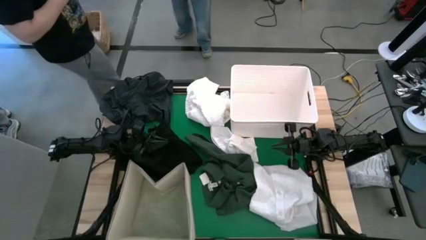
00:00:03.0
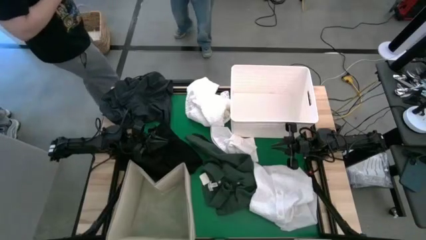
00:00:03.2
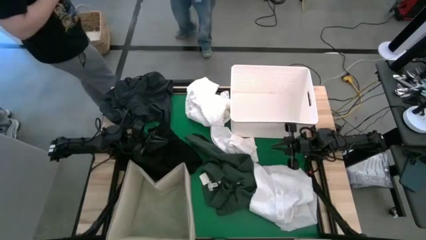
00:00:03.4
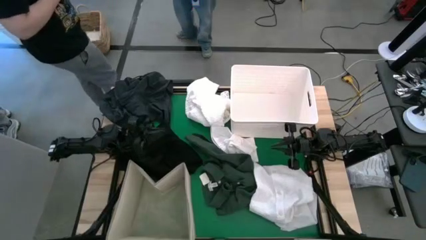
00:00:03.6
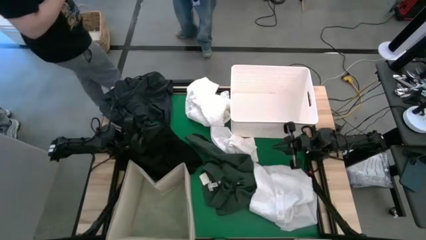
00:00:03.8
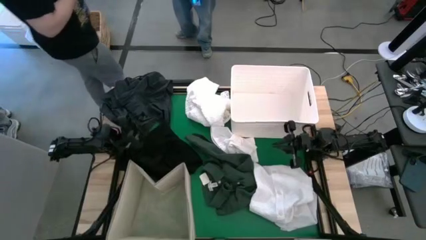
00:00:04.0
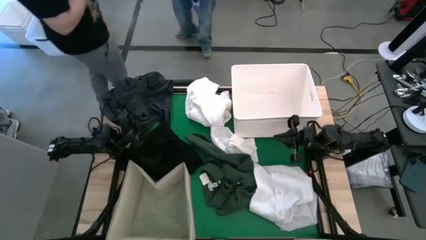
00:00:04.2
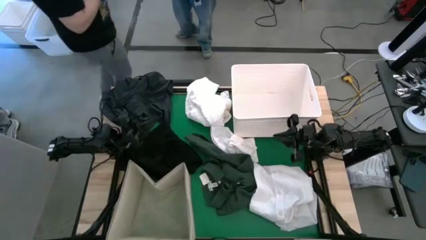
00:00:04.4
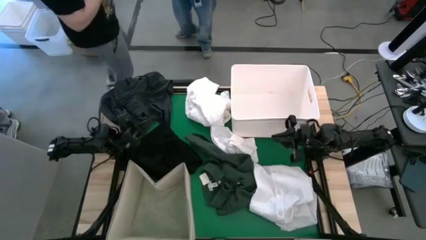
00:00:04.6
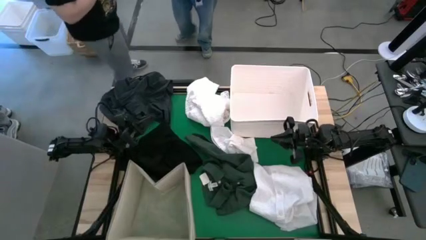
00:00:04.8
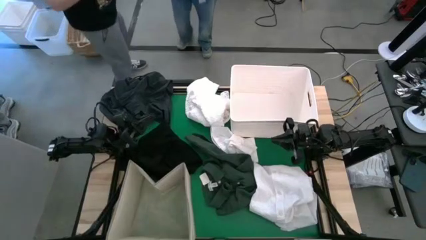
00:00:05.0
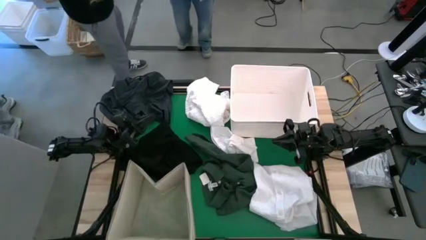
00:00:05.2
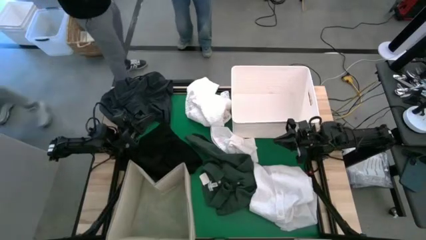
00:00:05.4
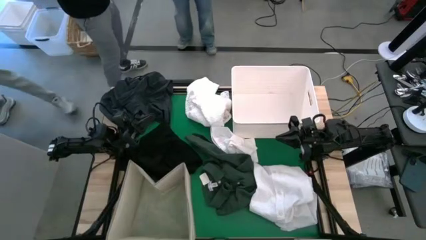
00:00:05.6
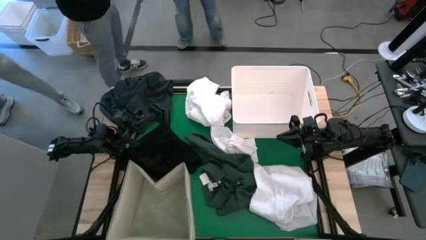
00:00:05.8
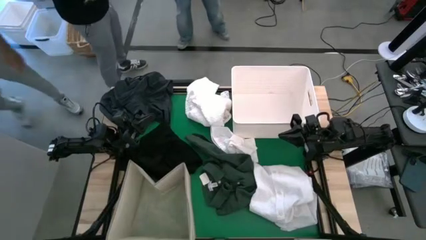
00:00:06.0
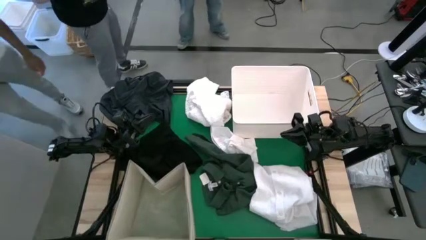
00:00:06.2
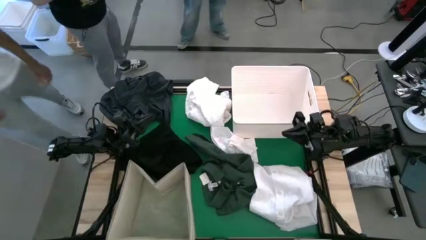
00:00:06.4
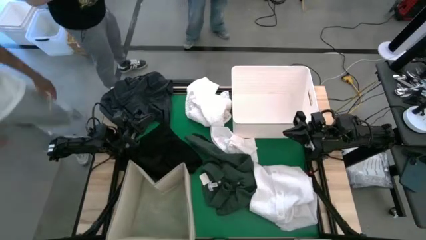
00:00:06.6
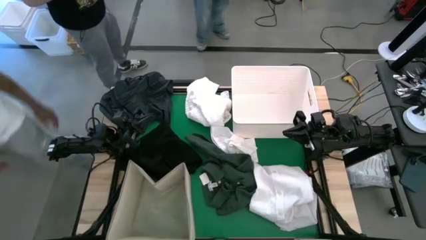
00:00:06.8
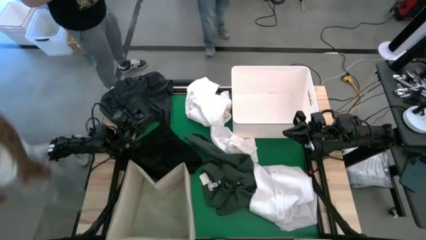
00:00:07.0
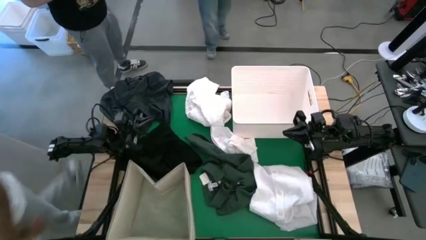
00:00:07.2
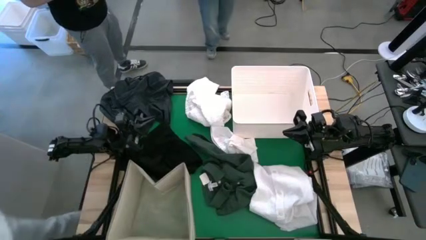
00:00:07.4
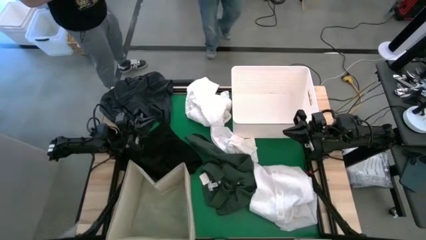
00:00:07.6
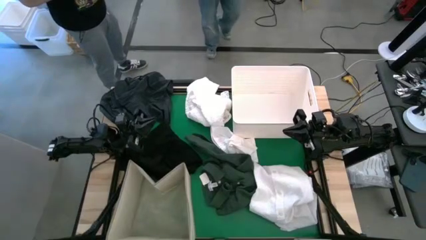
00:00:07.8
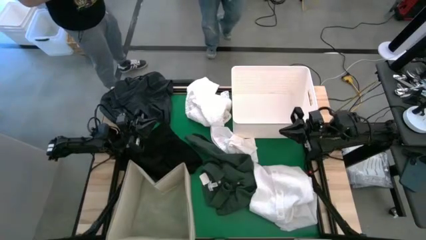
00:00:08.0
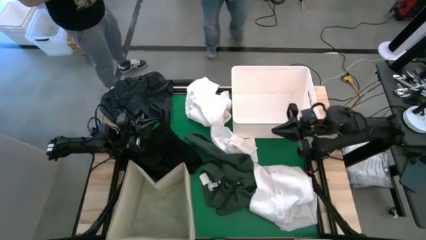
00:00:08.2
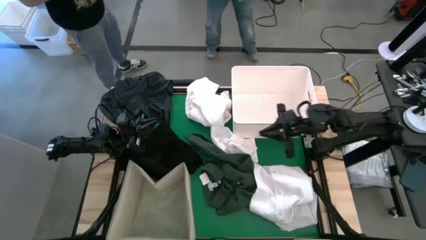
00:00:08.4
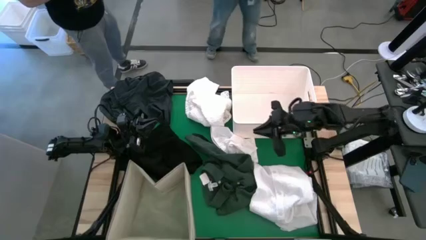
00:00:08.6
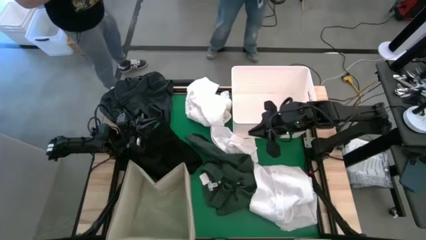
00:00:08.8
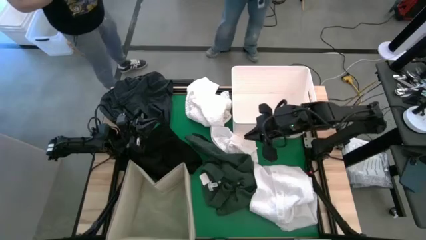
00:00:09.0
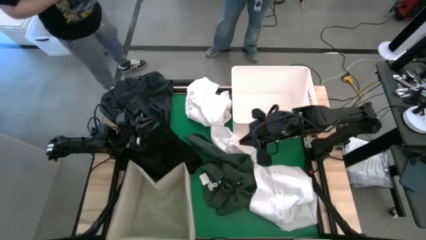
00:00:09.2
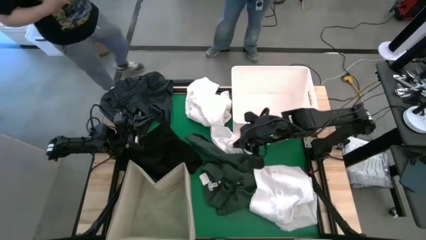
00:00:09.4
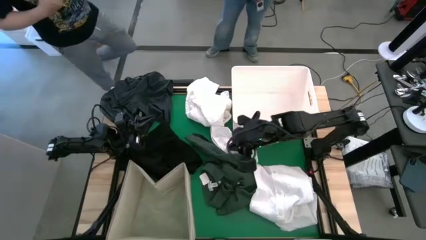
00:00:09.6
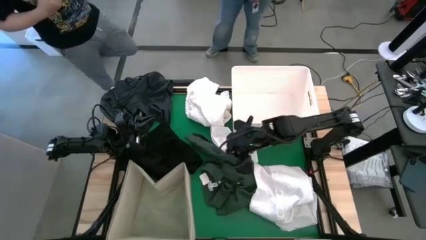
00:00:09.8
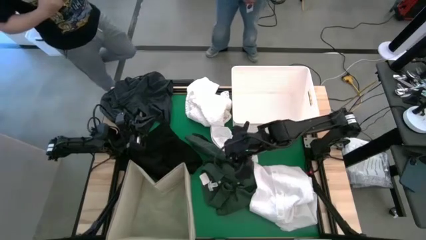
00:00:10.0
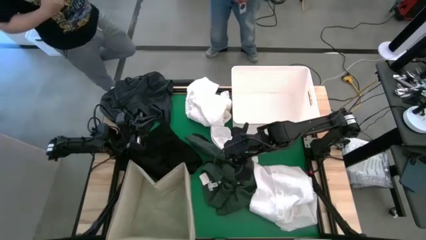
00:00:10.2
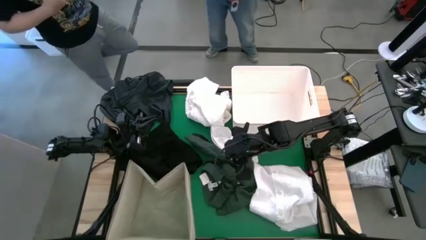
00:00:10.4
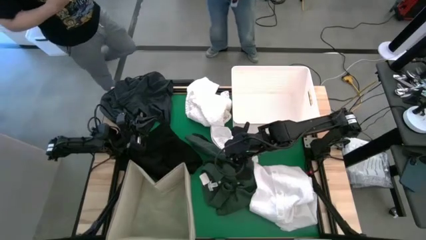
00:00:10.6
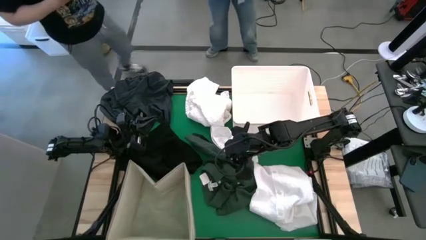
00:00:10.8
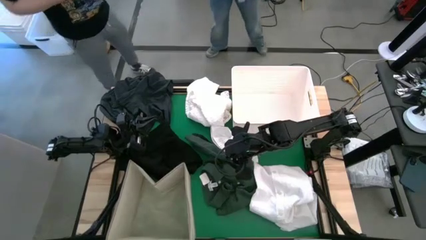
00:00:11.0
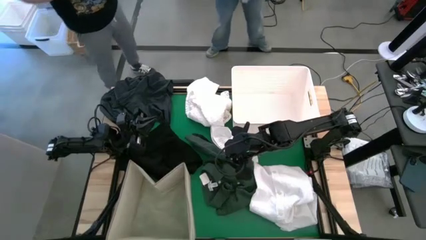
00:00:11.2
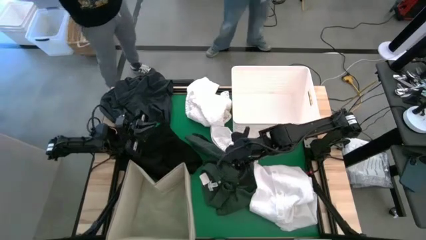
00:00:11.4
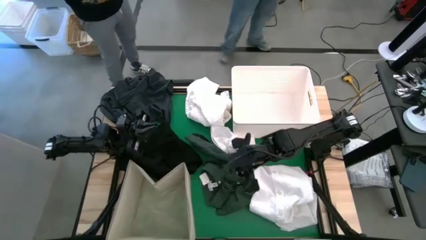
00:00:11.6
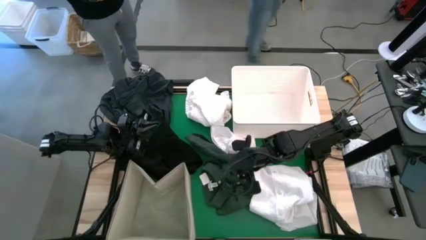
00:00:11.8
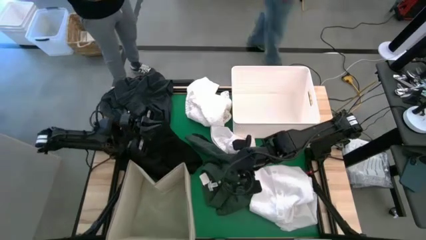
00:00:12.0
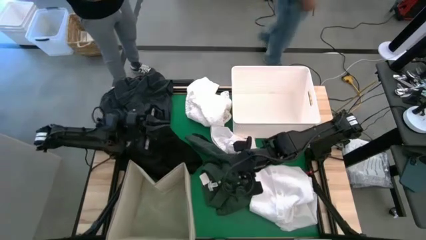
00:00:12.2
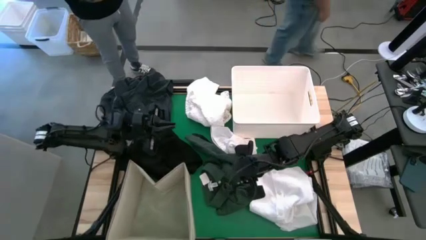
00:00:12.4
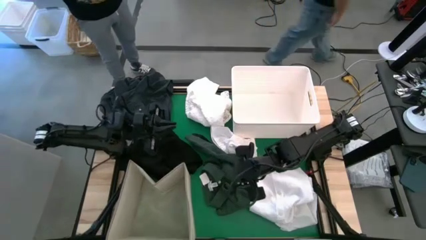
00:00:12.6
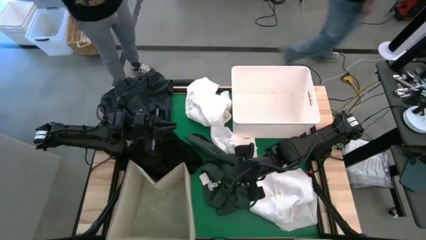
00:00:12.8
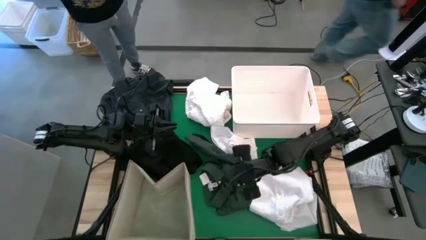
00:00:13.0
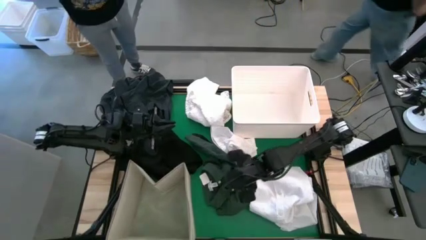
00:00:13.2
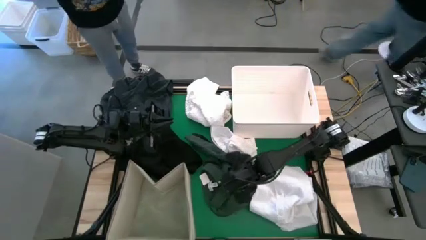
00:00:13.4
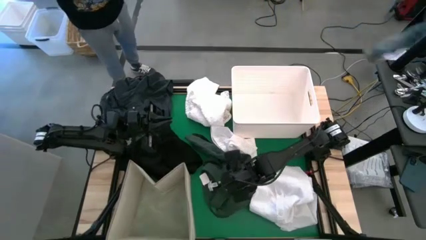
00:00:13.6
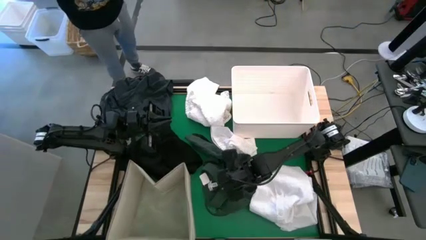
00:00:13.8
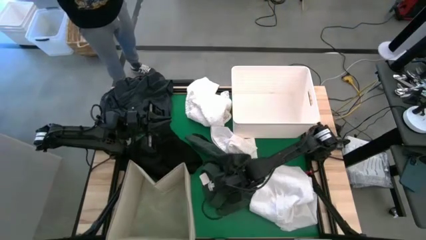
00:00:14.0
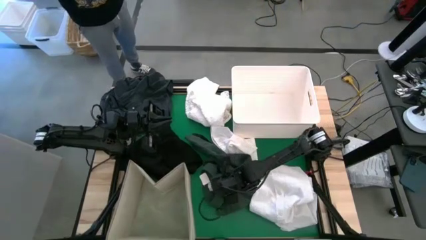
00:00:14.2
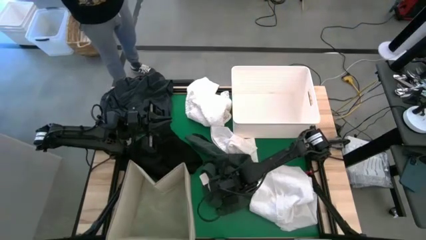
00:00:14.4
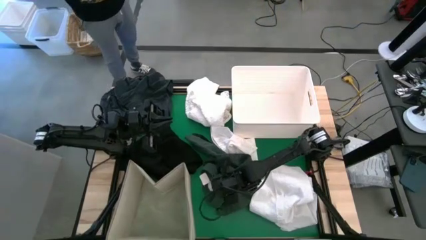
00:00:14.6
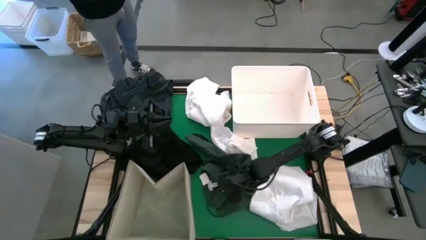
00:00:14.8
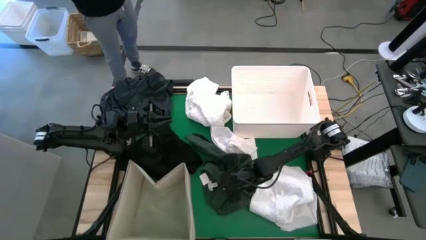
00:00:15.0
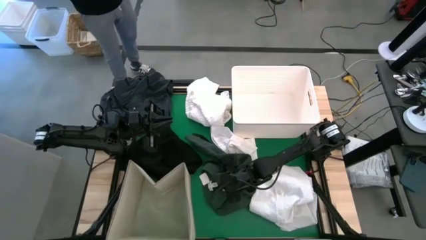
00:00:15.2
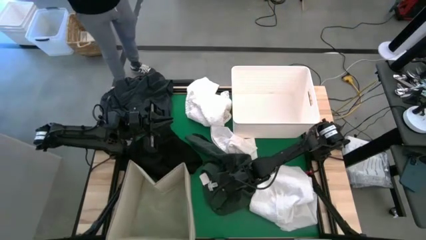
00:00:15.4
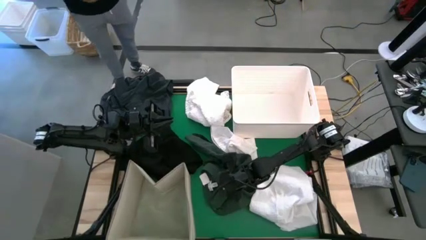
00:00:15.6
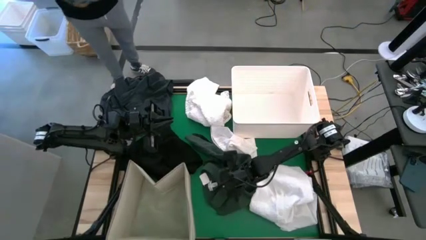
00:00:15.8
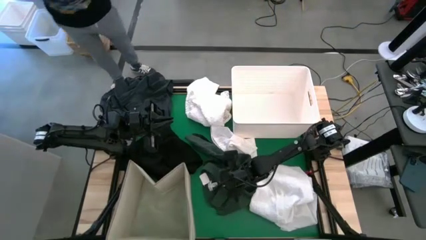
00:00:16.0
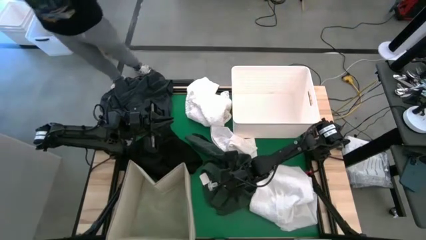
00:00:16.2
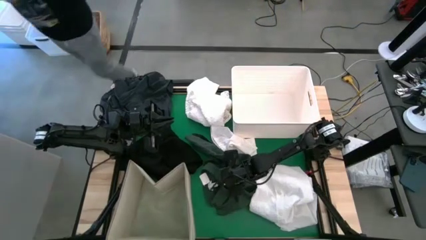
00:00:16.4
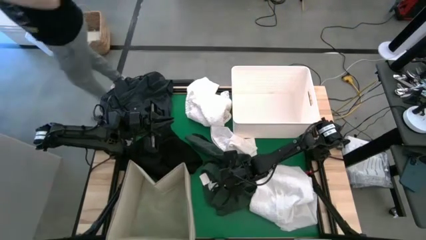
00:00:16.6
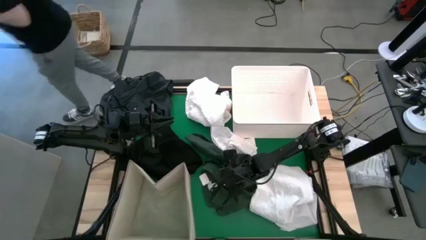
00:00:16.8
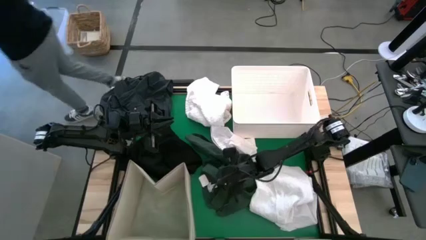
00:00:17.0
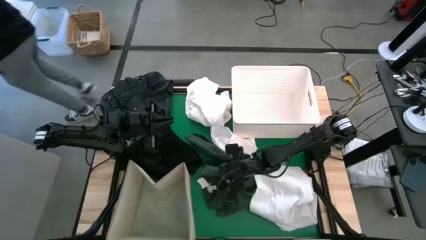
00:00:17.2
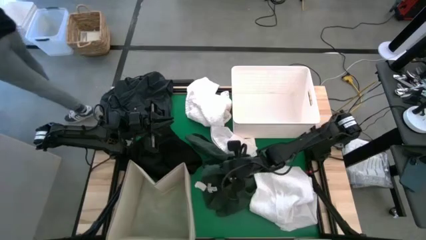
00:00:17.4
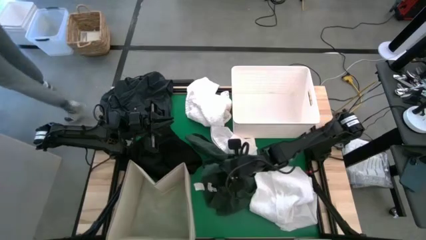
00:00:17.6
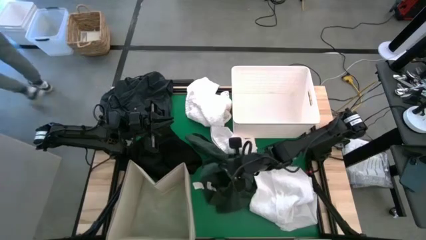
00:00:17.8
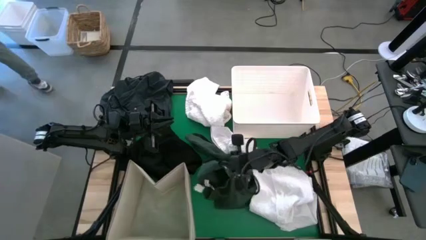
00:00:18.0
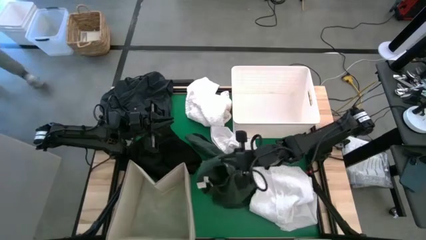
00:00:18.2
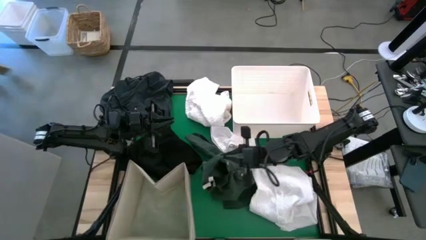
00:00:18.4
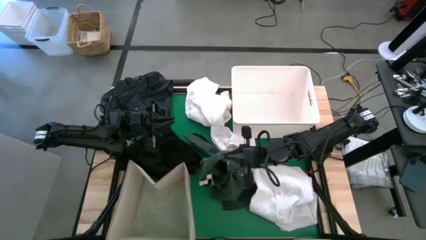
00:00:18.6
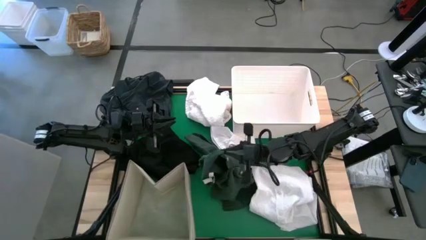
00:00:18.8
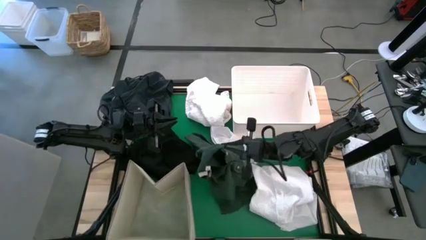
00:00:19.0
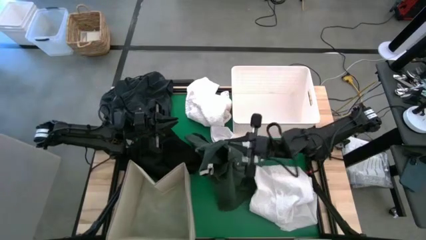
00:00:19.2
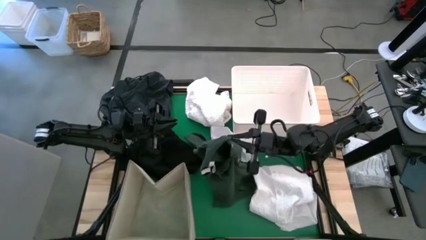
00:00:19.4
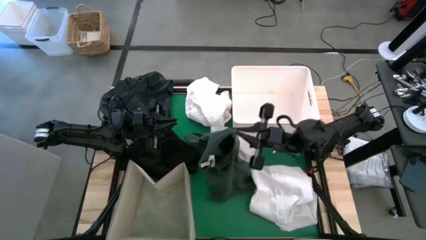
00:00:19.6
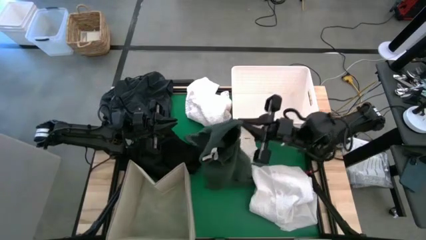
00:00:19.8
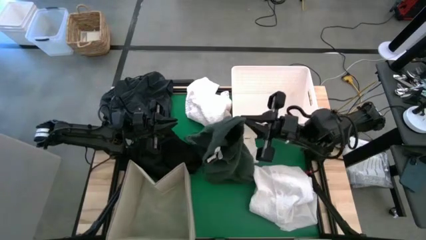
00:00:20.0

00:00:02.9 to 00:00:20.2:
Task: Sort clothes
Put the green polo shirt into the top right white bin
